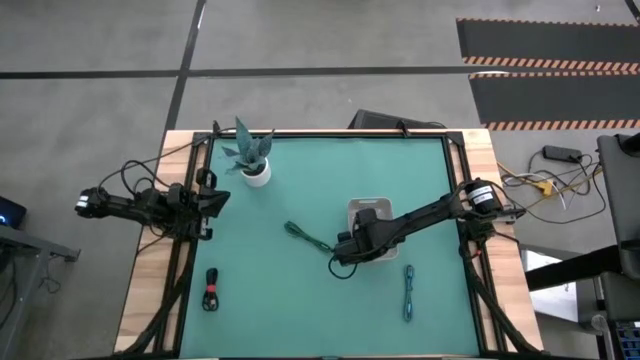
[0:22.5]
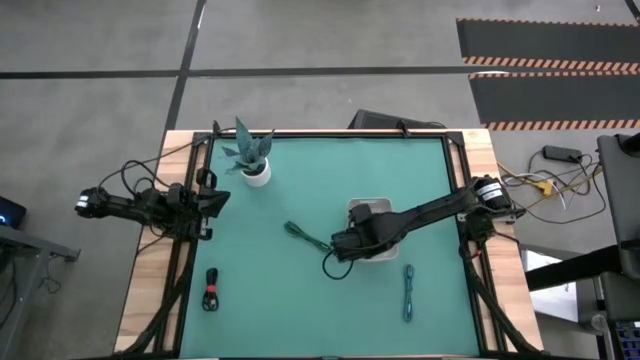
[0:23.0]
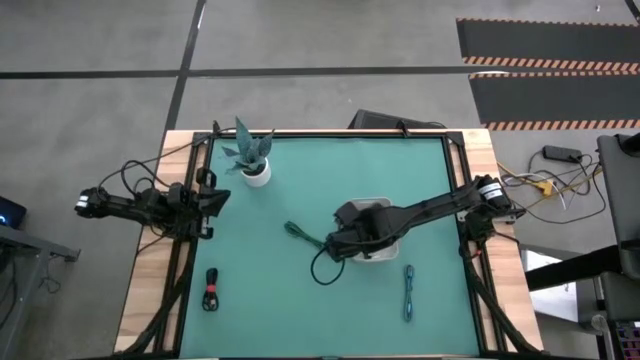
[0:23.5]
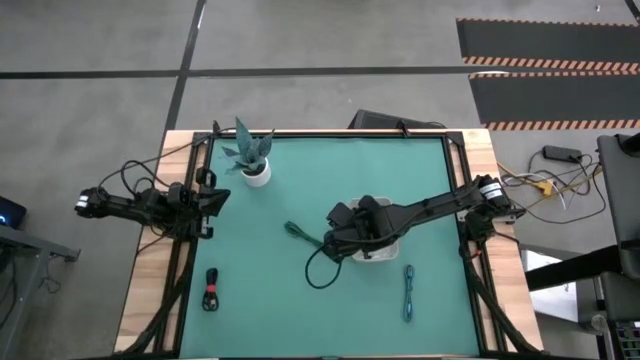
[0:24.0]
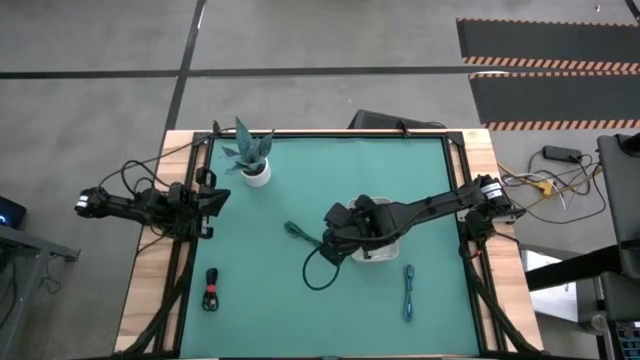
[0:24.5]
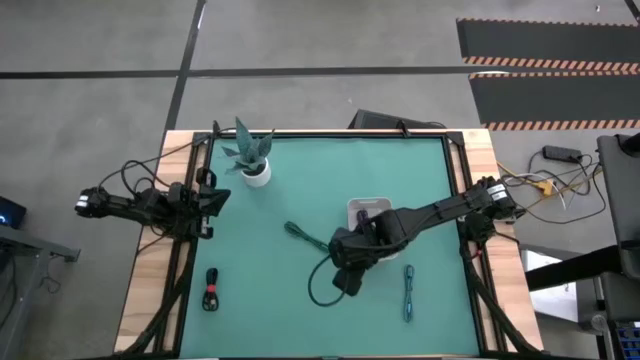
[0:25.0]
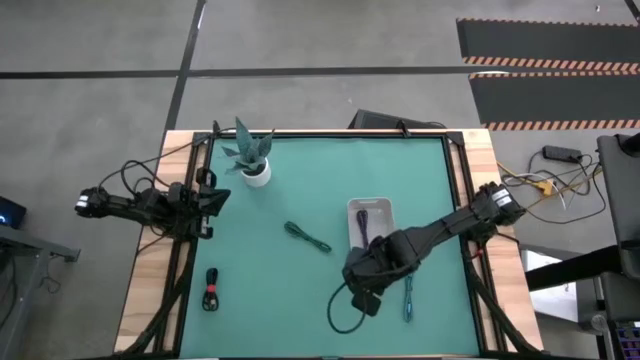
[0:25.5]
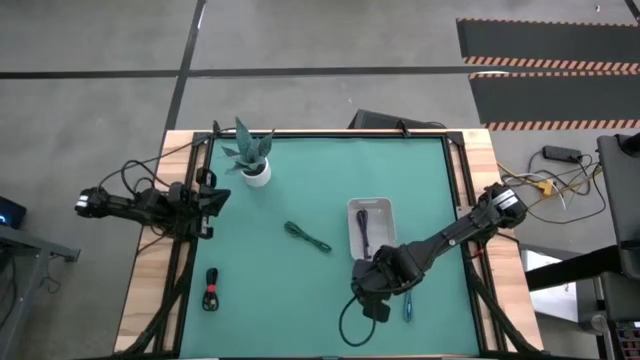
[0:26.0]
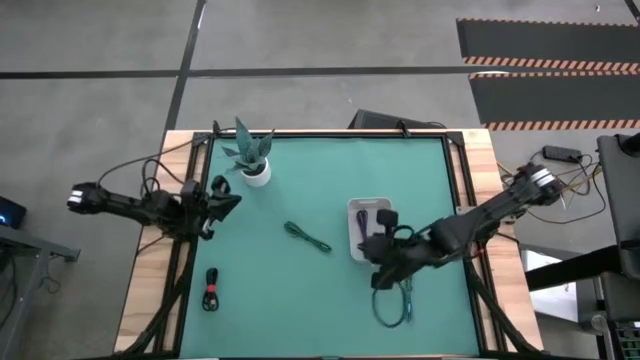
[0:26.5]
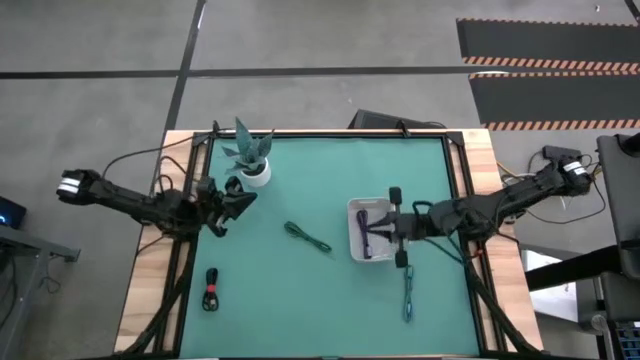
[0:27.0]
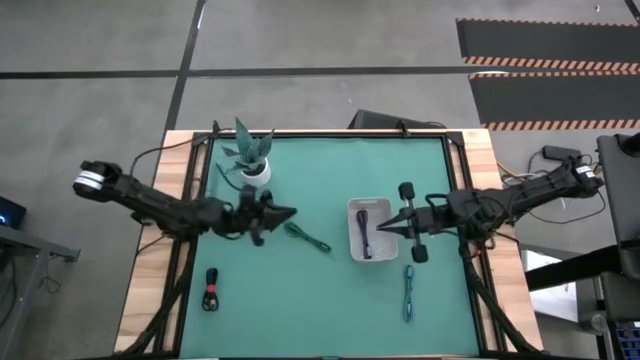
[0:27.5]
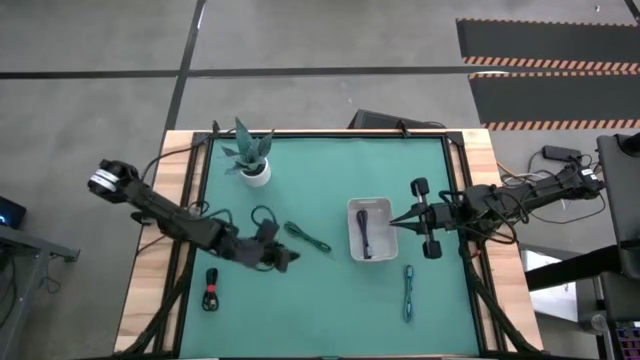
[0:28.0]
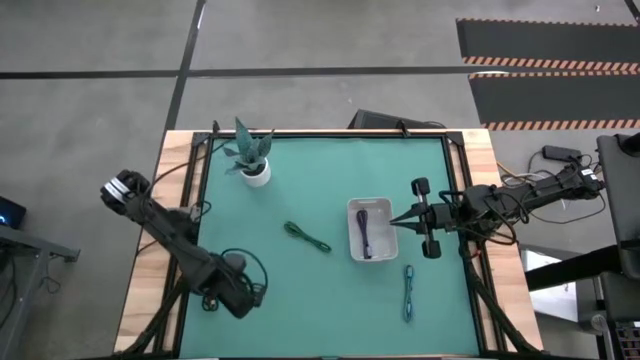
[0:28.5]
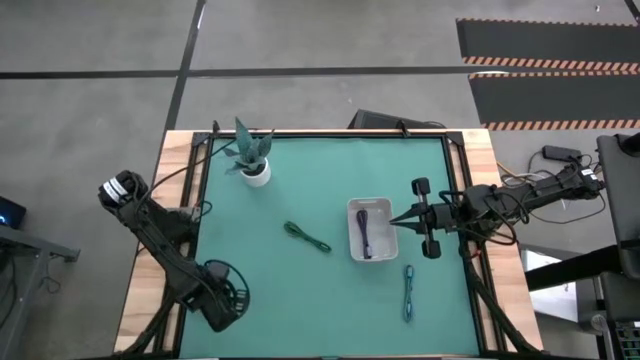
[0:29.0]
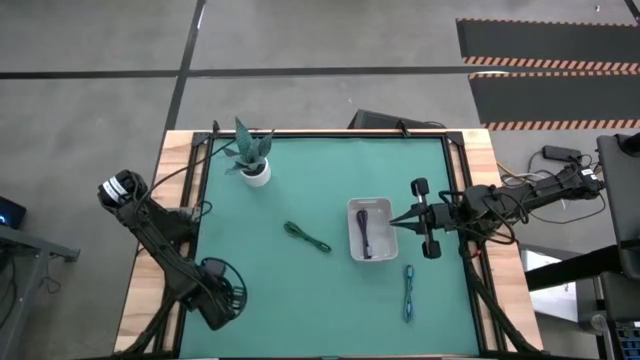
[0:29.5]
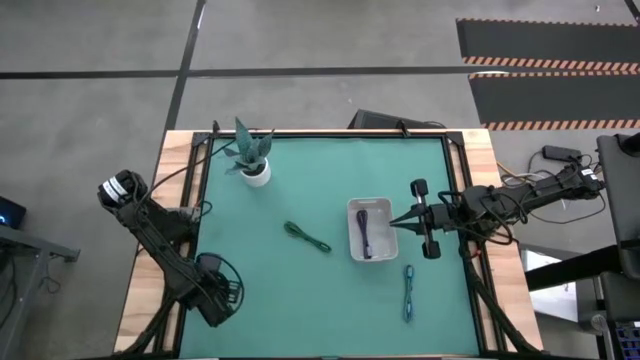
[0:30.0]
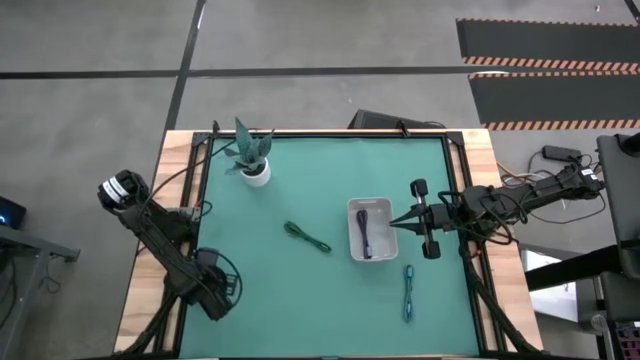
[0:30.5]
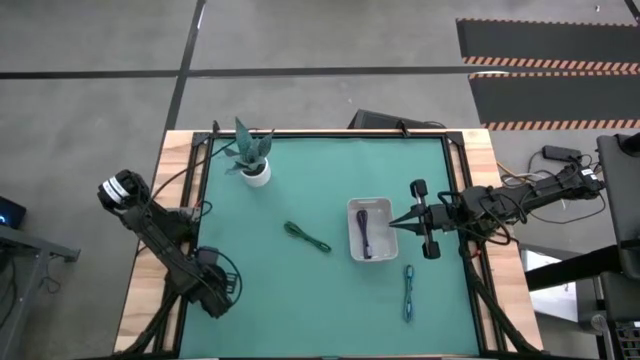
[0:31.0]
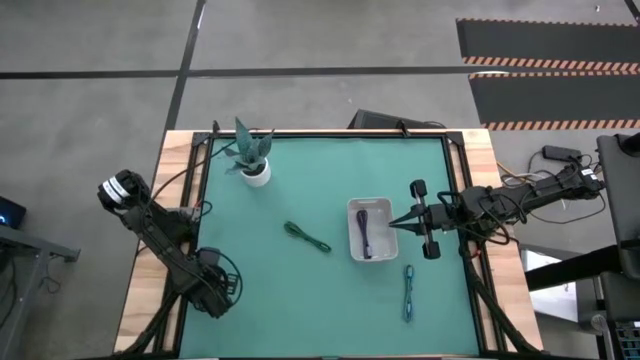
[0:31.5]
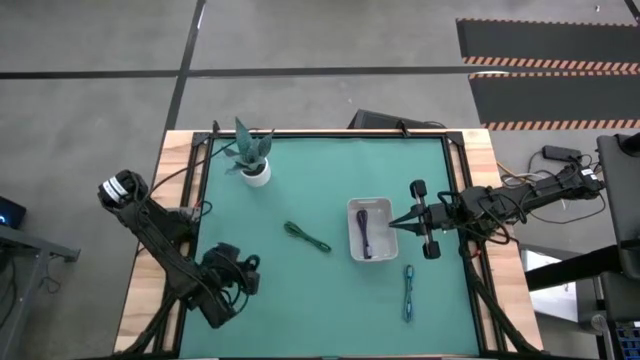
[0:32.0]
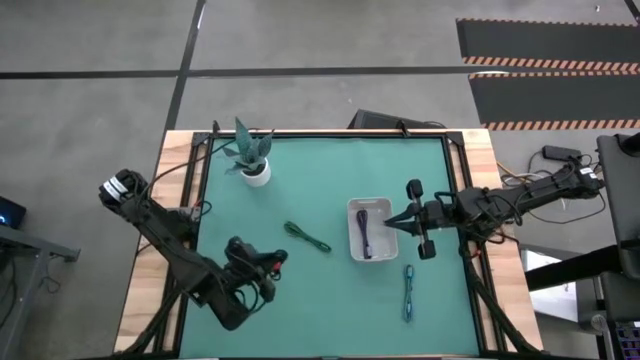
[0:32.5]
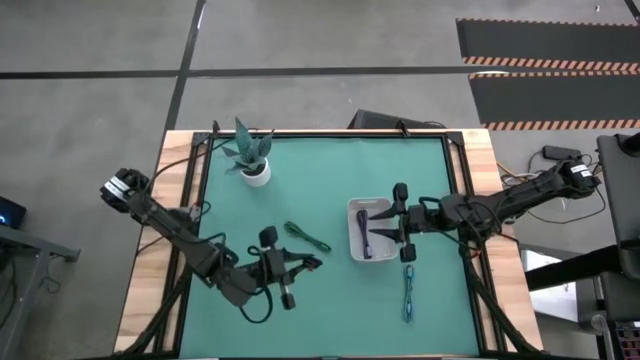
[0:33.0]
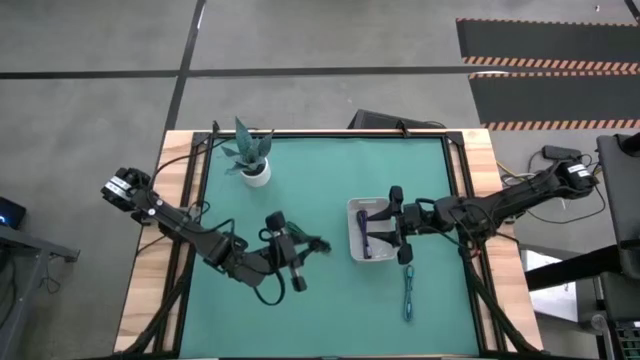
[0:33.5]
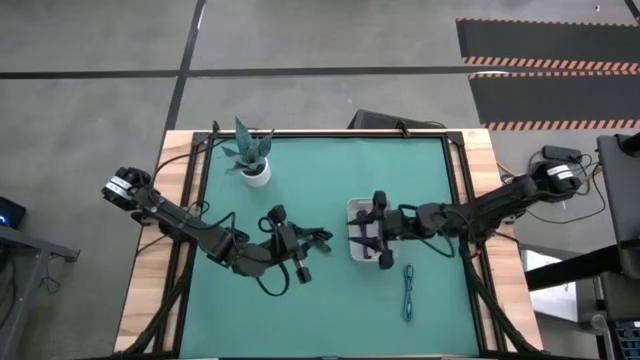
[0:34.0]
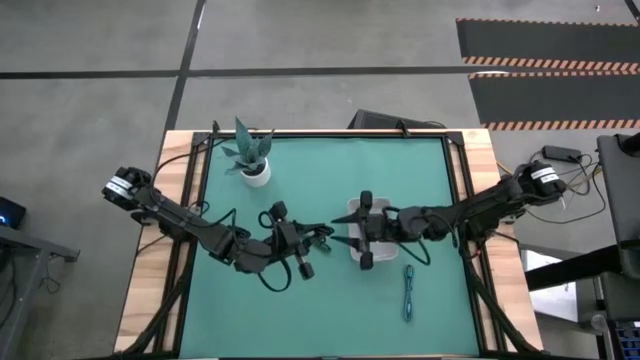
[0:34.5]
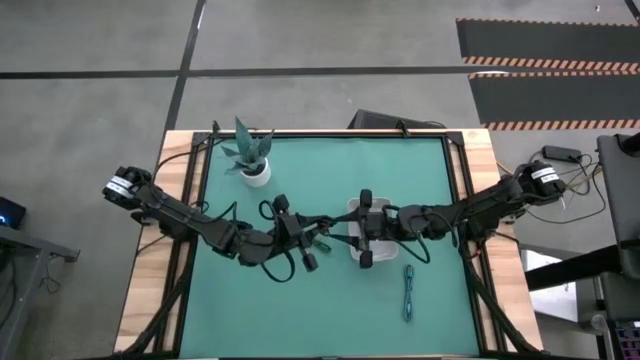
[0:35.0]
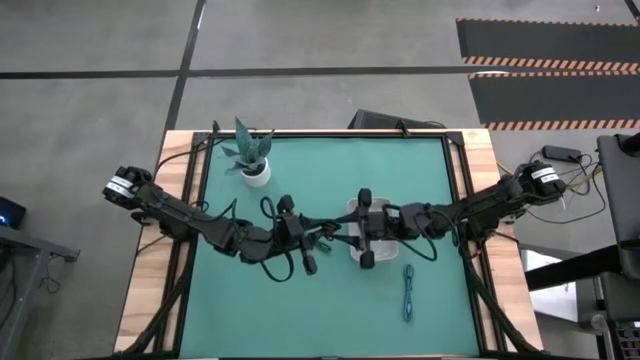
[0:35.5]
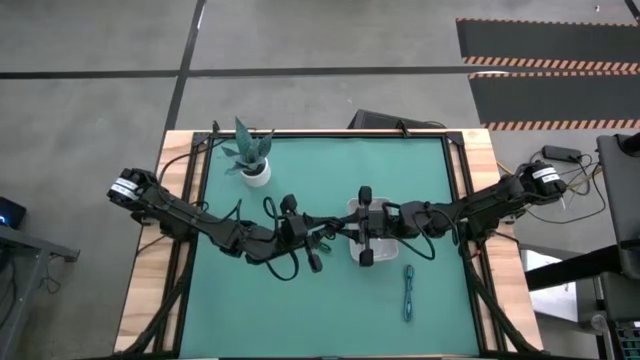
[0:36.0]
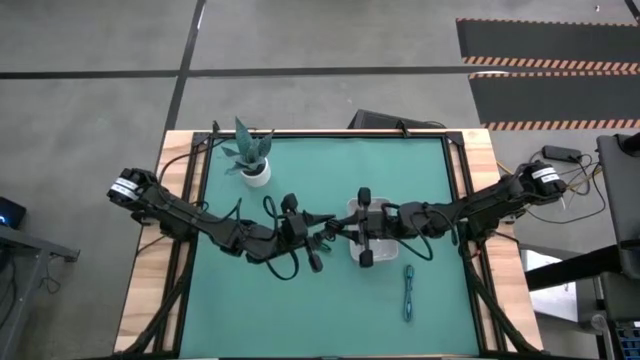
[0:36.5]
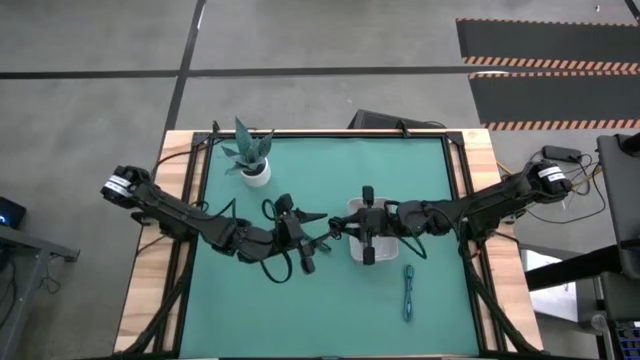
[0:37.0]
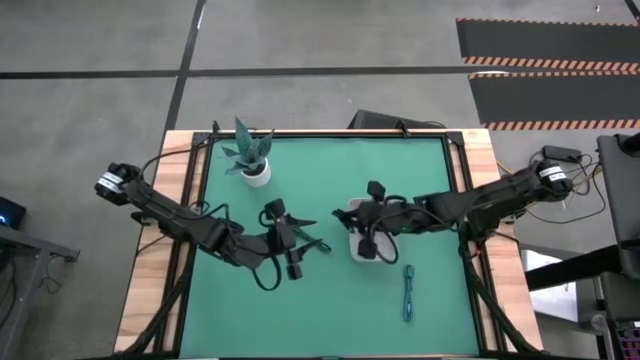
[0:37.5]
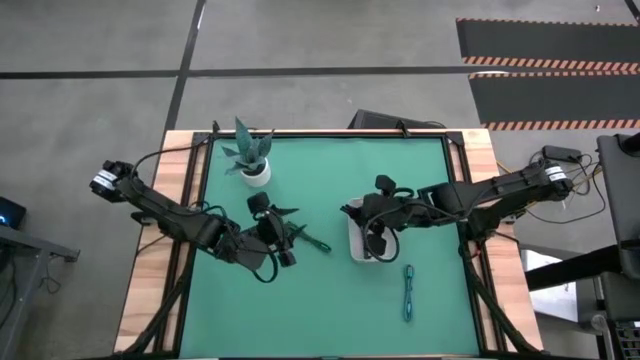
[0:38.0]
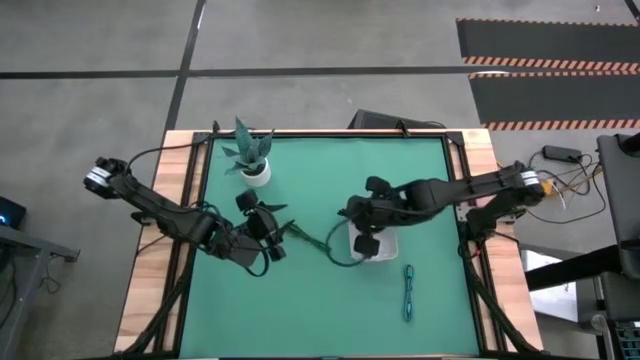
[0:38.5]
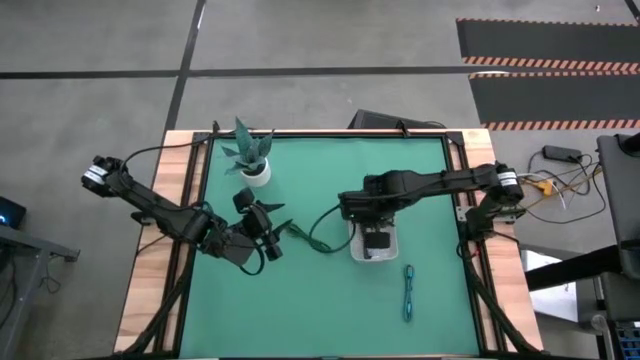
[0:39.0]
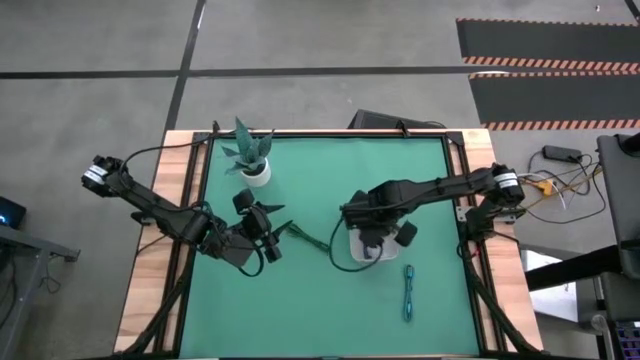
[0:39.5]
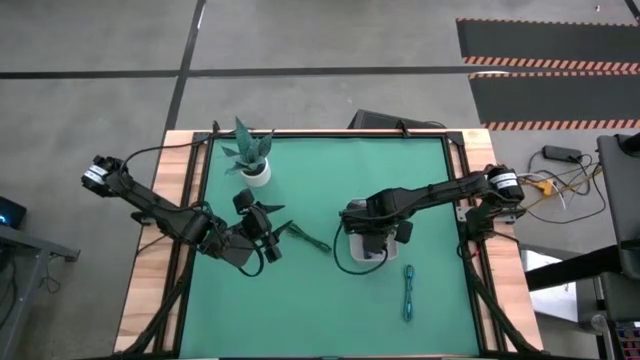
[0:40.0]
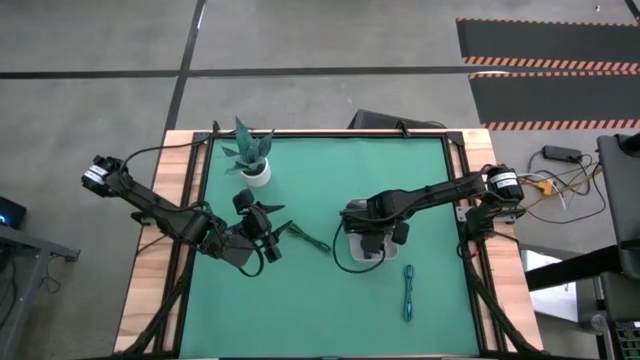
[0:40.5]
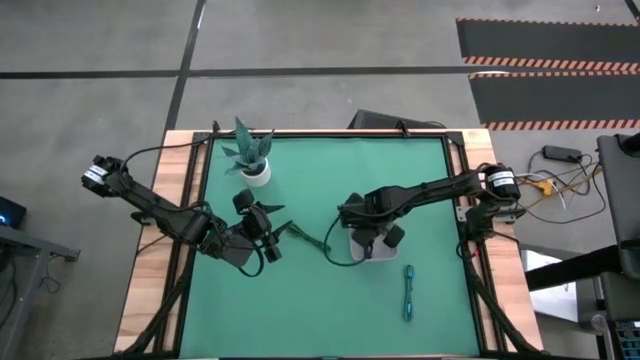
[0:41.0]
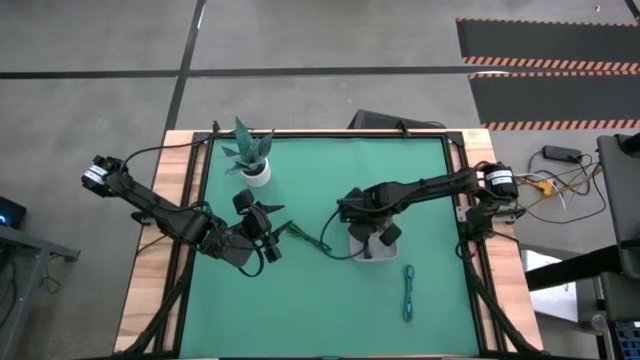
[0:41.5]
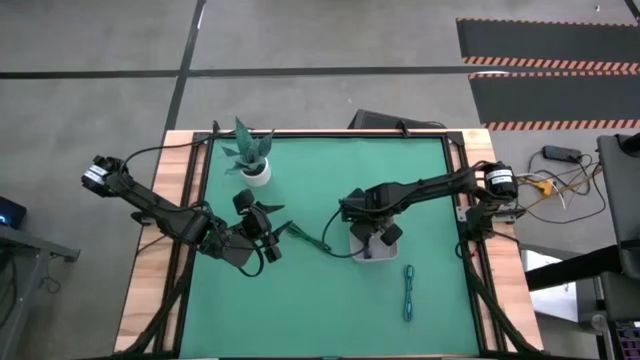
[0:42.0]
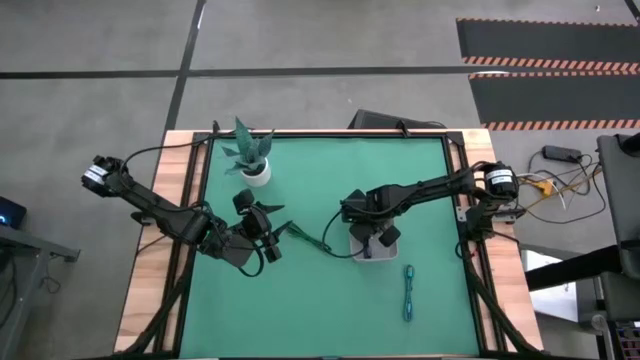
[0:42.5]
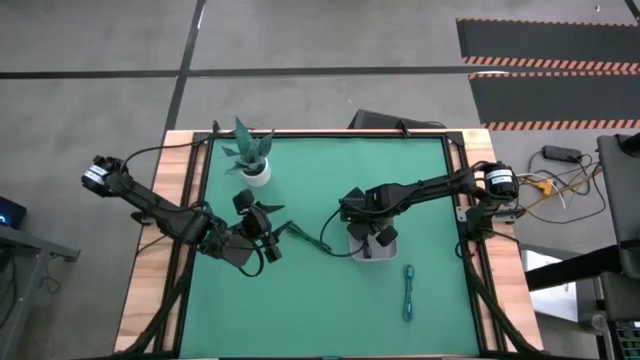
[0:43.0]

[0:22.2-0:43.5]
Task: Pick and place USB-C Cables
Put the black charger cable into the gray bin
